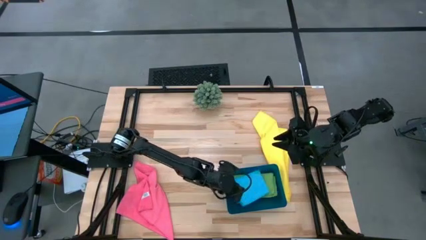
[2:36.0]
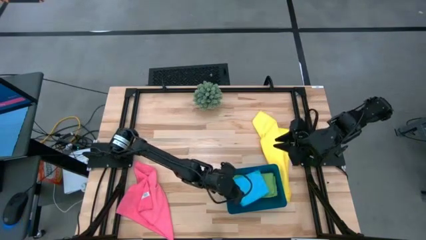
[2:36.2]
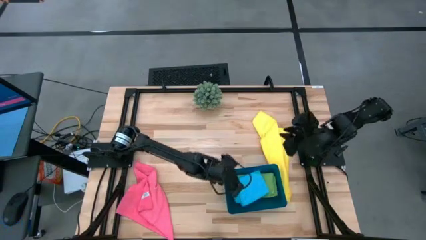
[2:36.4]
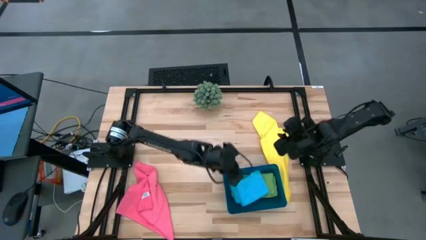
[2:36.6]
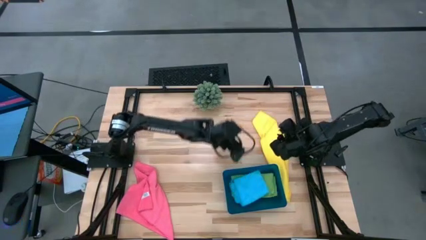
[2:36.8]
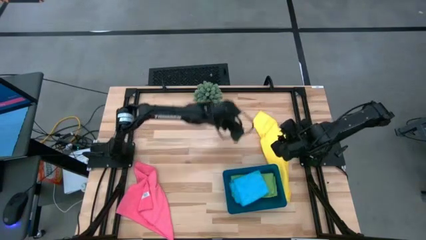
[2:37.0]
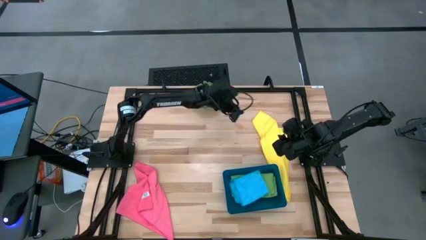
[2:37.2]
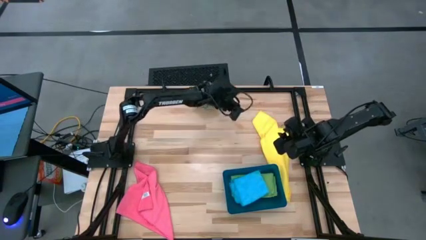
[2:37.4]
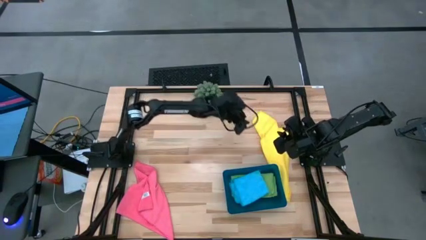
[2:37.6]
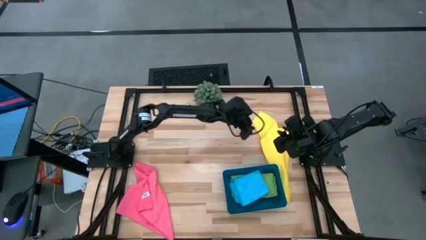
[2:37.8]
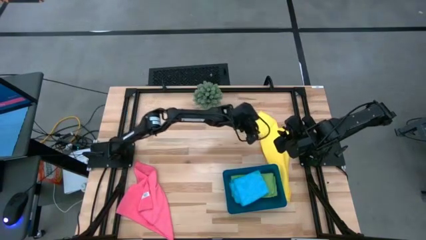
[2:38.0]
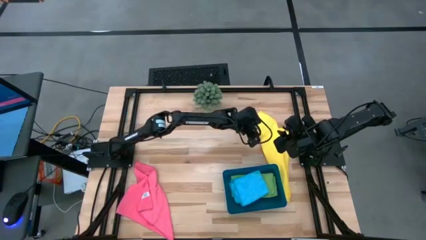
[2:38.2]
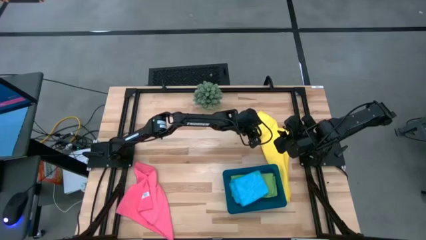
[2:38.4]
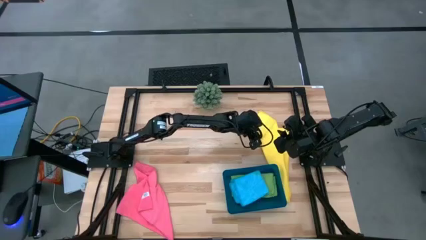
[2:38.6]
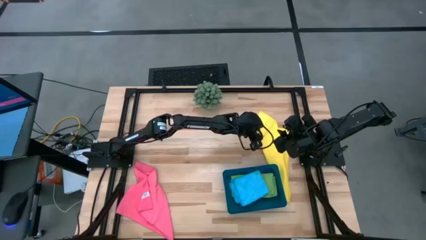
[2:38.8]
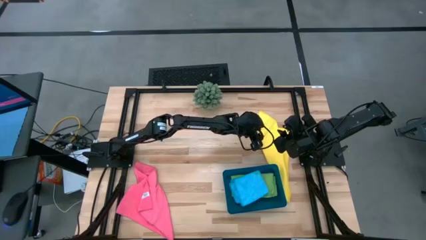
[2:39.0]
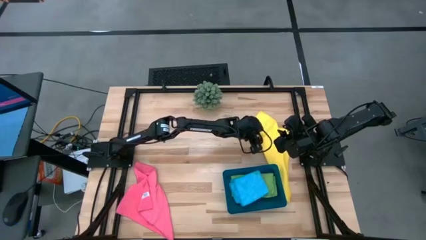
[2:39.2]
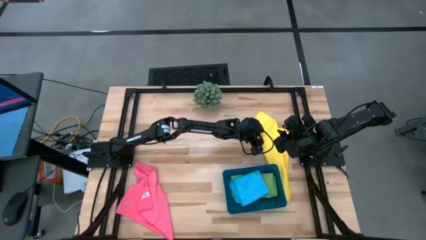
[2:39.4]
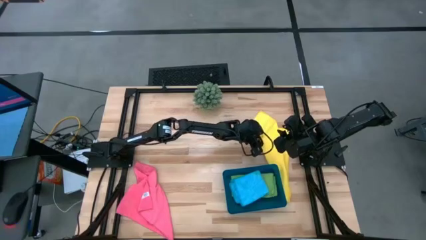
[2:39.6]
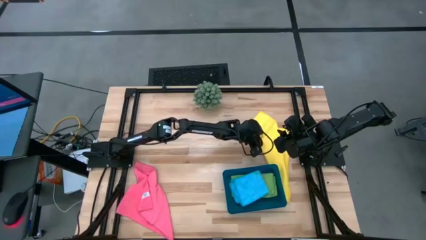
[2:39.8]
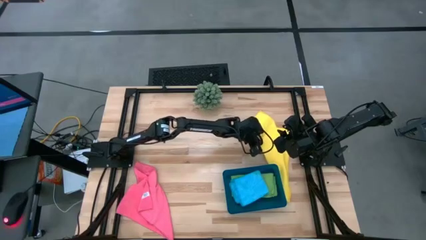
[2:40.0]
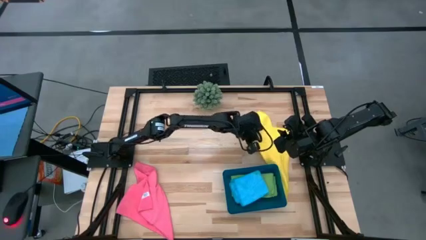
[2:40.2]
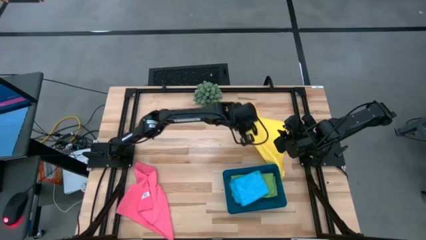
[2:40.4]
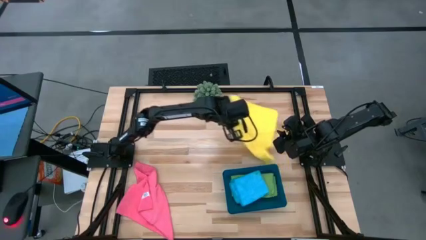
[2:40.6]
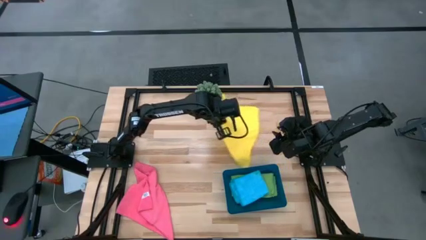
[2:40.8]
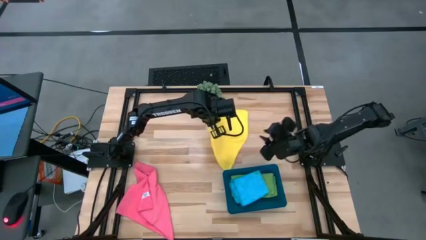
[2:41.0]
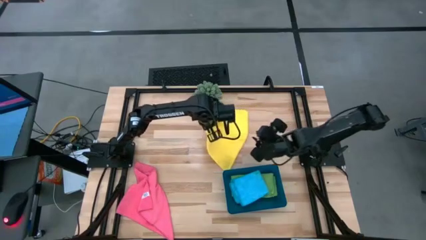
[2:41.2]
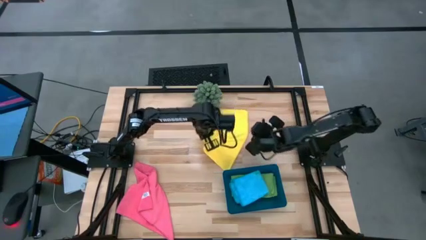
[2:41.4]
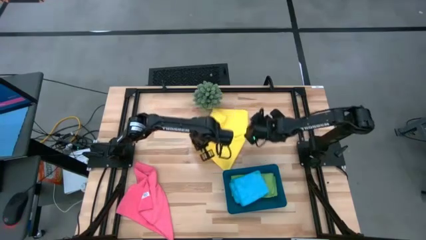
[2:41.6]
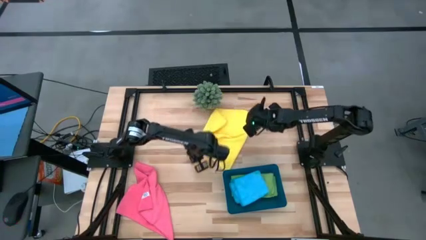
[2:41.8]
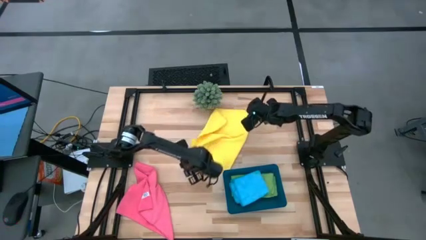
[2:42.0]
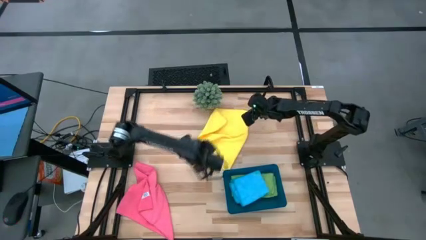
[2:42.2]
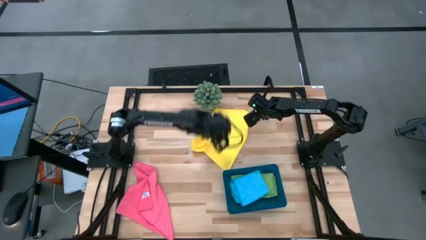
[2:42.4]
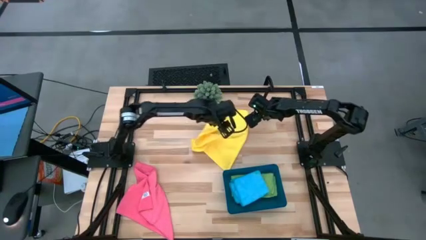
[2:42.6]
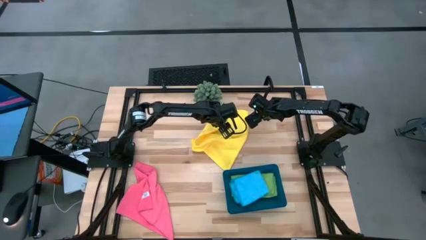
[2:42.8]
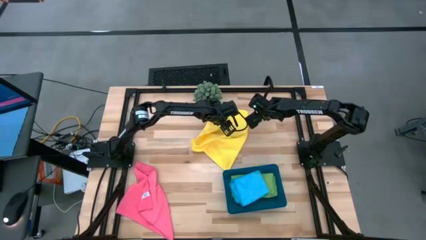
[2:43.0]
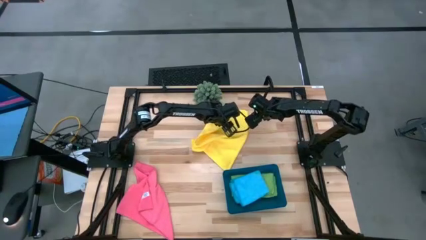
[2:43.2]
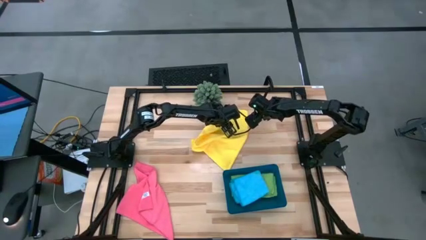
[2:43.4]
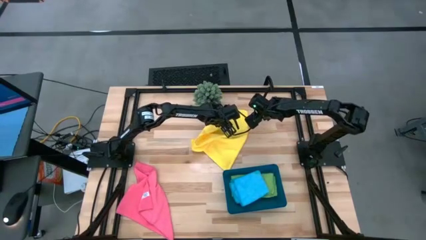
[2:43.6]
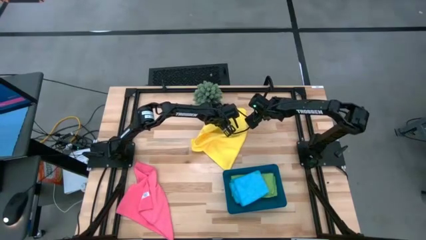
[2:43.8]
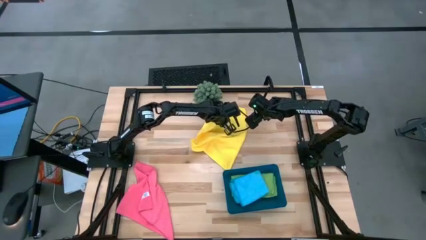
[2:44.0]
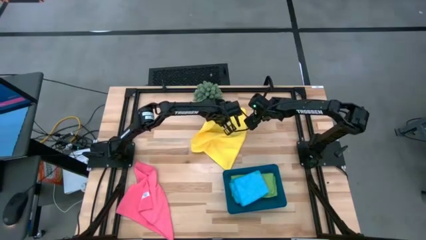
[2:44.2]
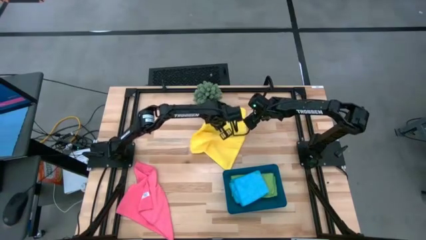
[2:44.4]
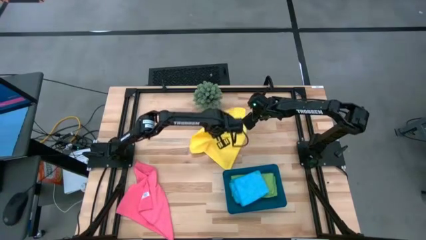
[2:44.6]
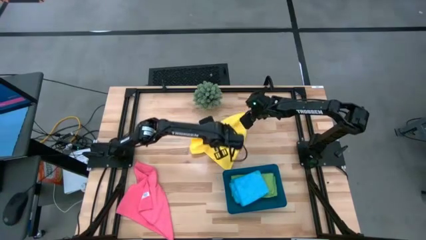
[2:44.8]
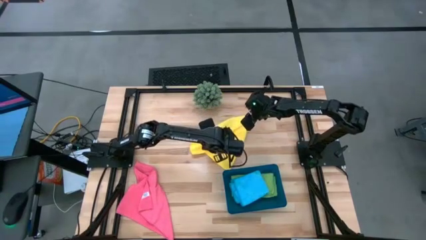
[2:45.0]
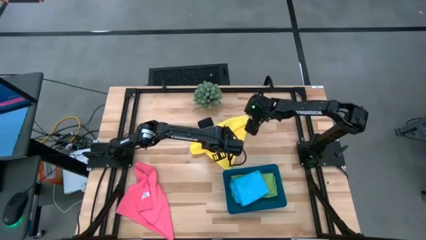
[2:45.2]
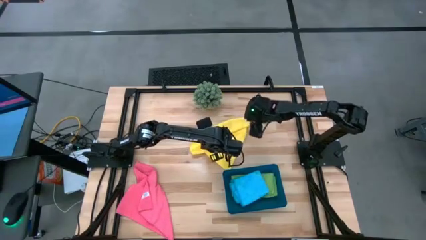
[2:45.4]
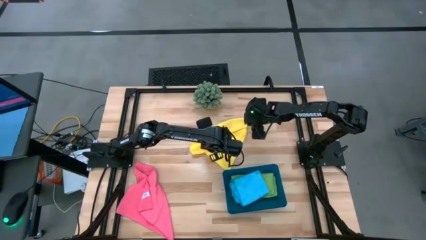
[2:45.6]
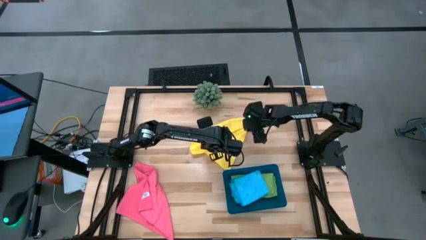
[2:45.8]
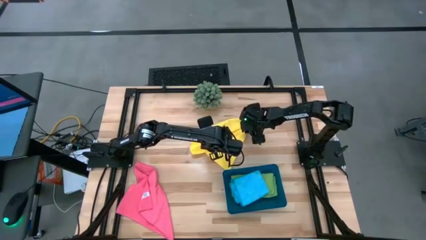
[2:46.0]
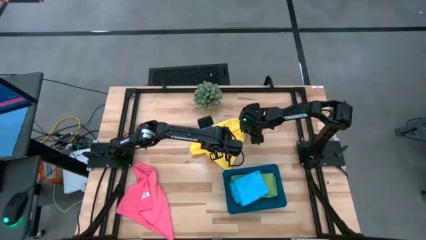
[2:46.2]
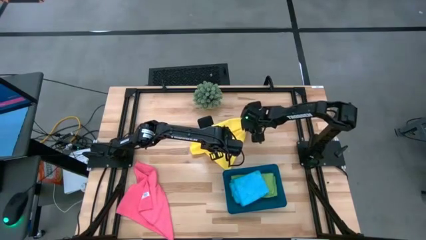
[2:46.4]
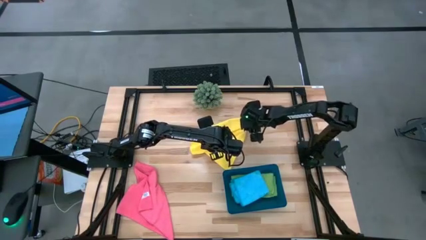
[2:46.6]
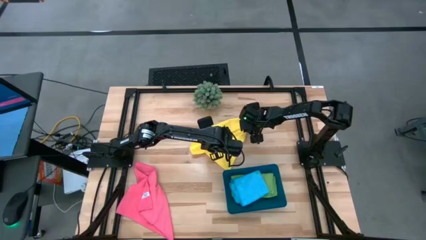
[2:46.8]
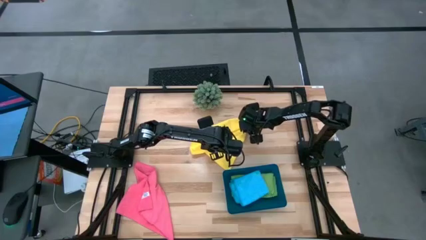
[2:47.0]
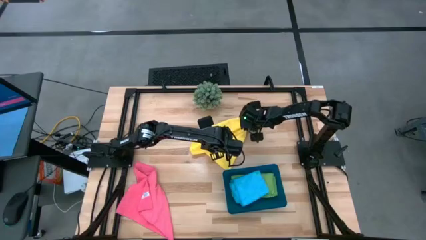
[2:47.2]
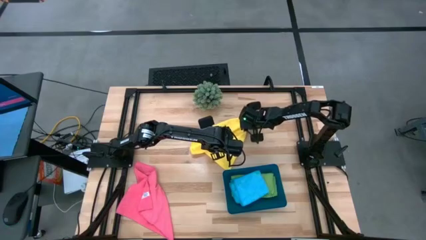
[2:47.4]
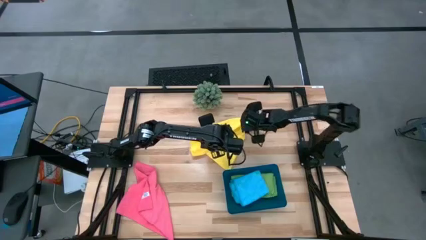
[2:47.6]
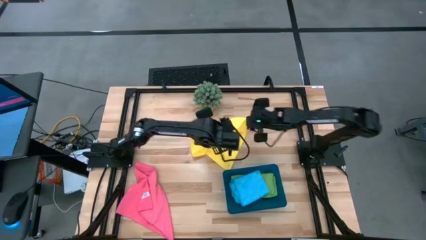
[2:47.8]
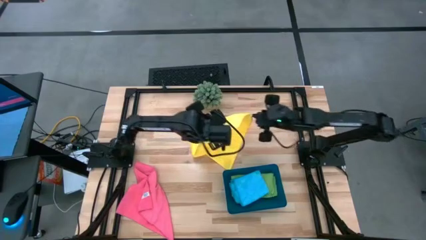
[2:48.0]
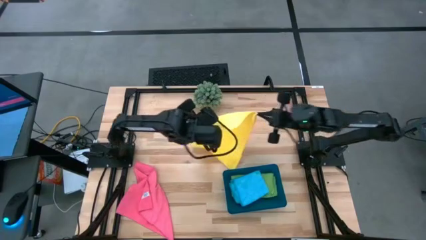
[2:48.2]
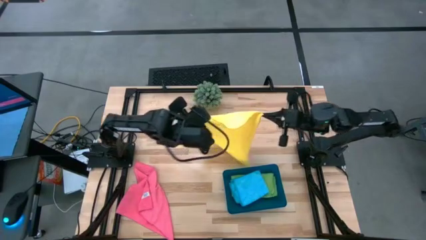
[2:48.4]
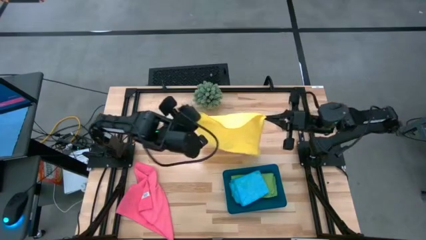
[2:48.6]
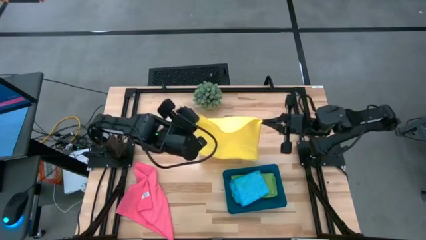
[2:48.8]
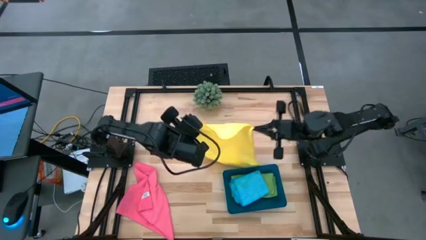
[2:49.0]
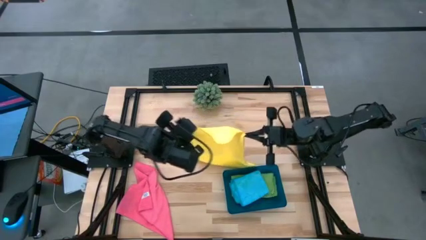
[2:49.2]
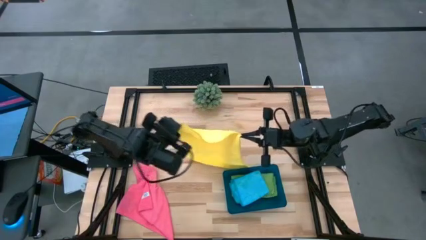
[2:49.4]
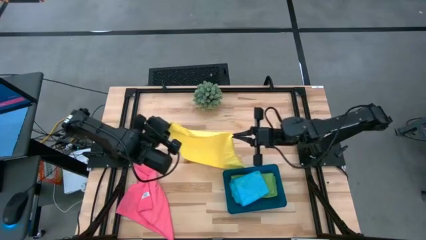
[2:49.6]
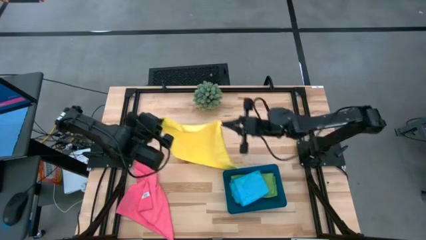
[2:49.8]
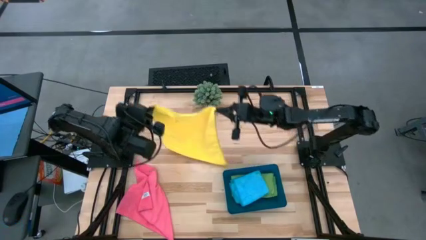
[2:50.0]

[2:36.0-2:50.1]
Task: Fold microfiber towels
Fold the yellow microfiber towel

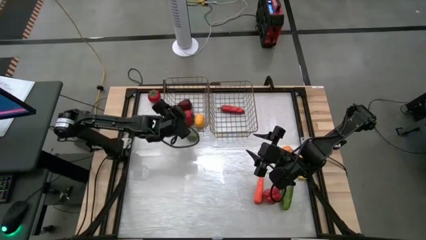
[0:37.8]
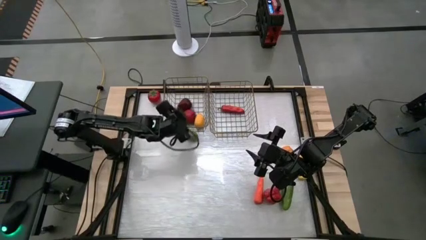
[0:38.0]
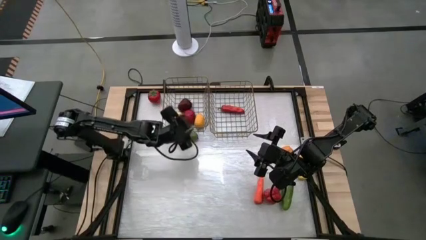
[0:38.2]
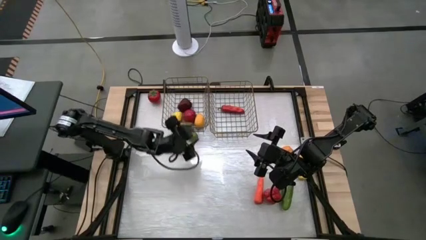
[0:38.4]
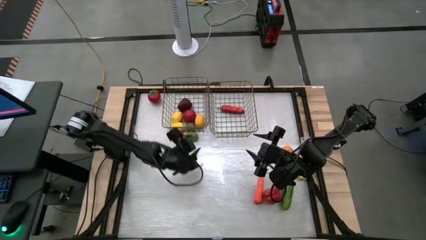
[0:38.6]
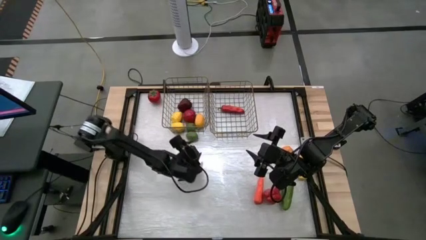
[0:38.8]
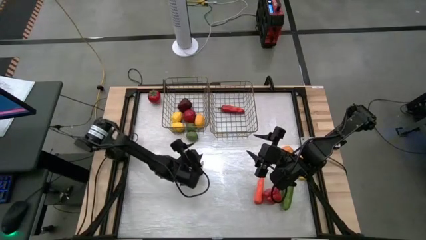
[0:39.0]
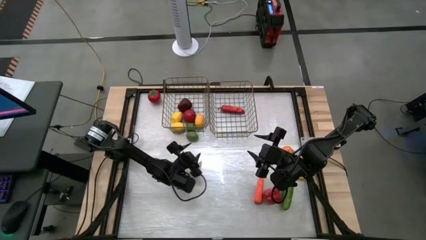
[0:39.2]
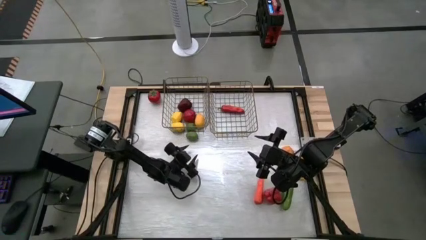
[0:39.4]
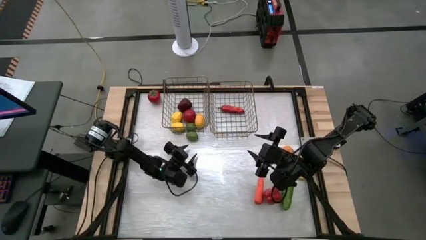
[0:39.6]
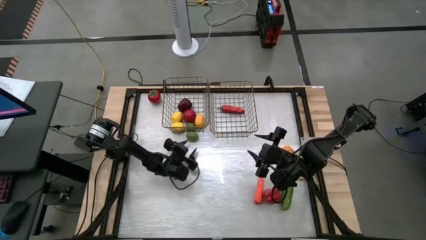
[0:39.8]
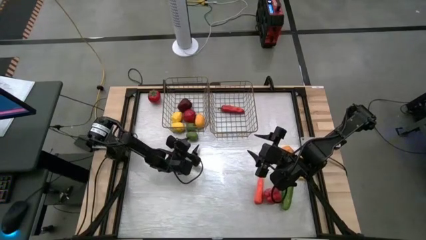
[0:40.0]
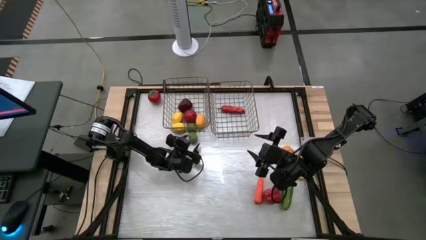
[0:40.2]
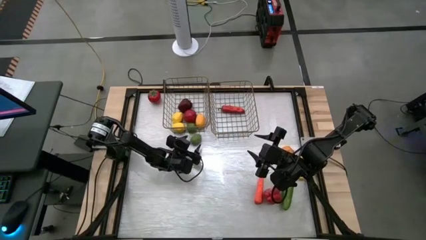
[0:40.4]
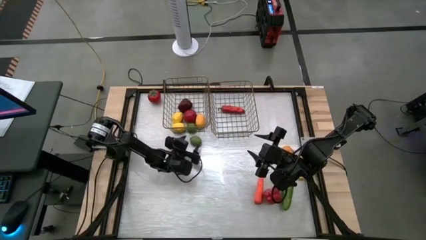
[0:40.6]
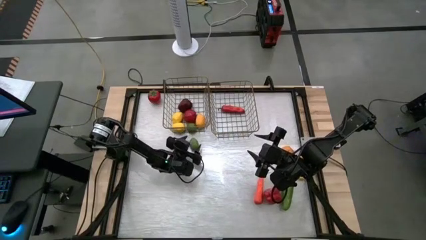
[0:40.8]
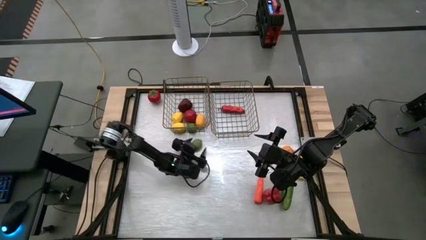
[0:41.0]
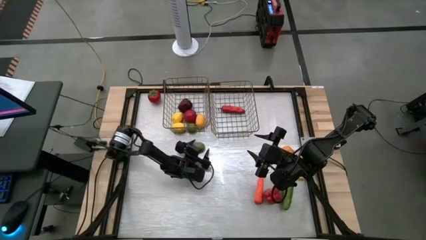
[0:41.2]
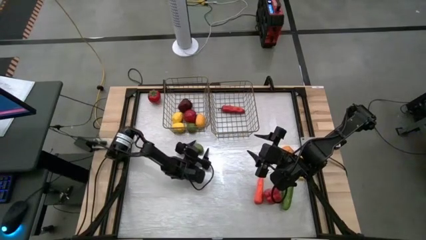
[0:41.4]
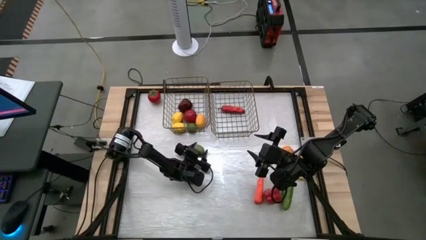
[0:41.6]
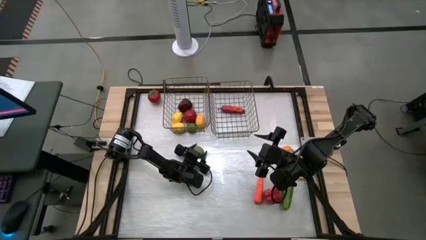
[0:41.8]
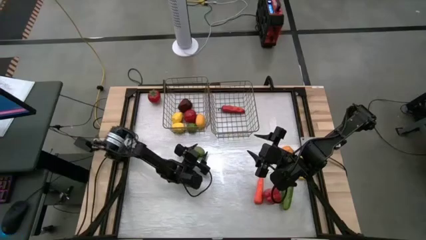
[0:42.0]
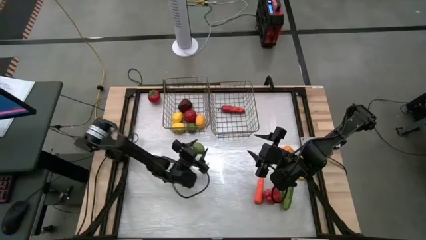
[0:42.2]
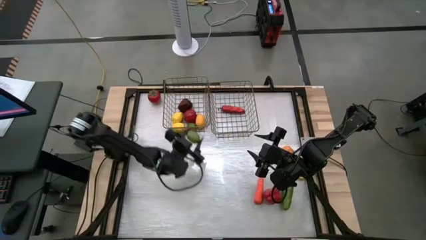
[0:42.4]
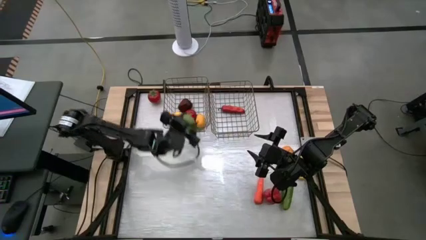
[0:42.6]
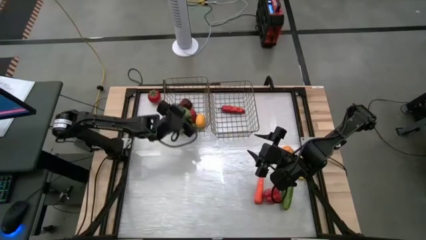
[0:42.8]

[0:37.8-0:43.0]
Task: Sort produce into baskets
Put the lime into the left wire basket
